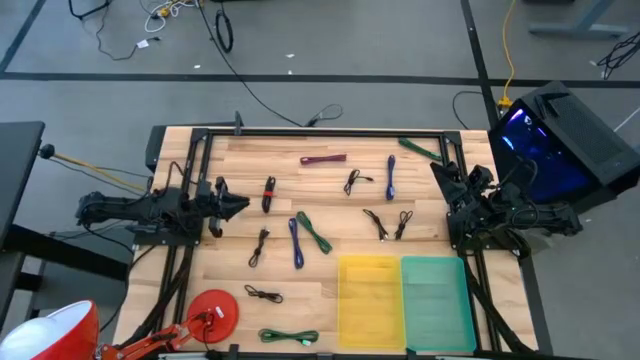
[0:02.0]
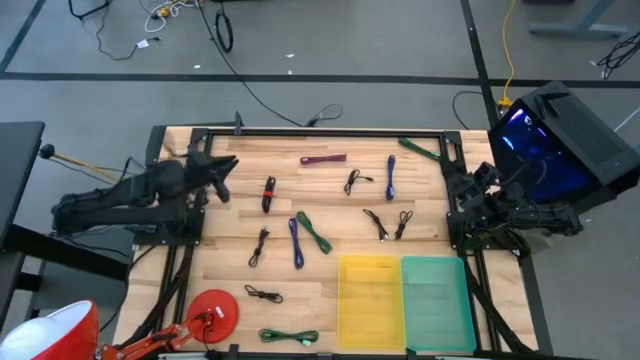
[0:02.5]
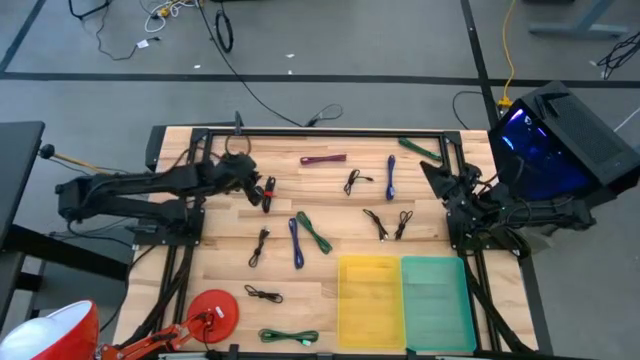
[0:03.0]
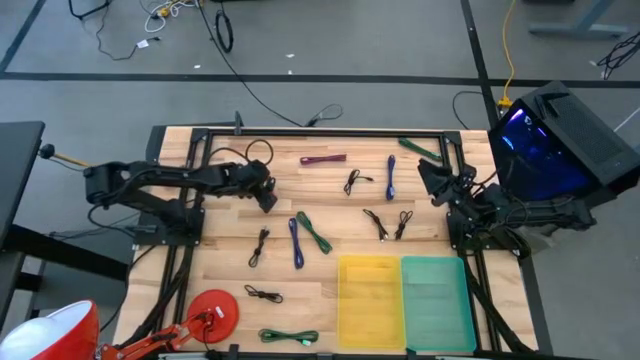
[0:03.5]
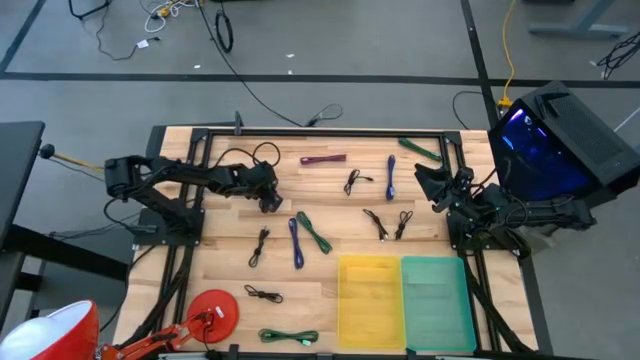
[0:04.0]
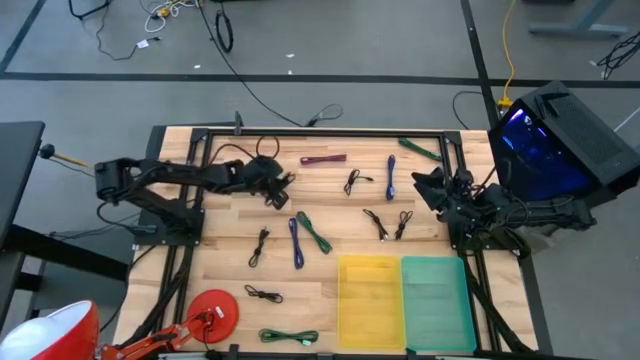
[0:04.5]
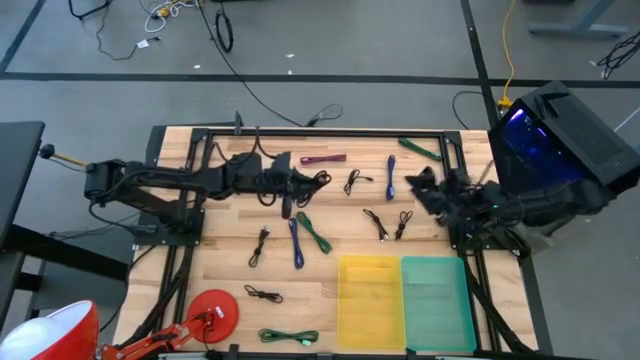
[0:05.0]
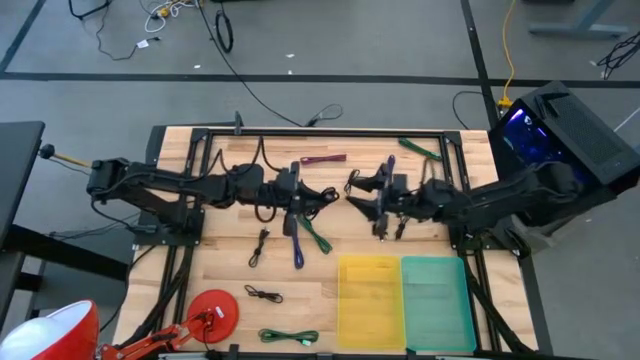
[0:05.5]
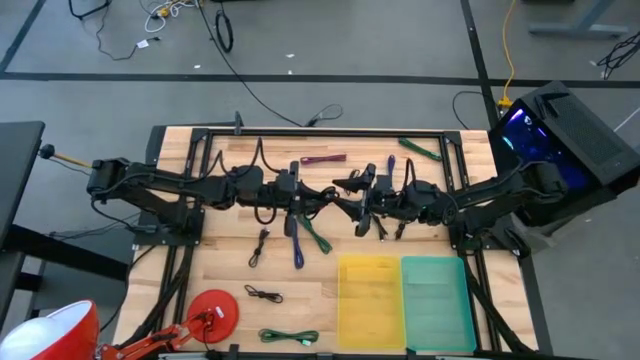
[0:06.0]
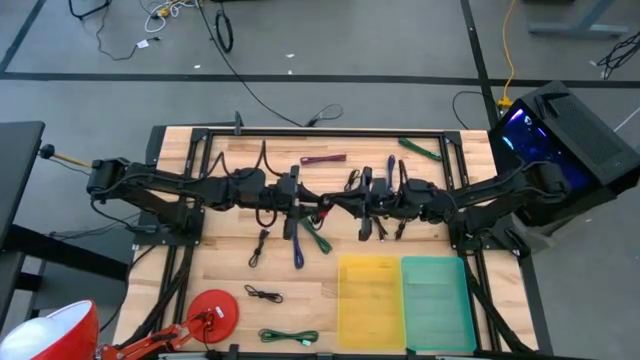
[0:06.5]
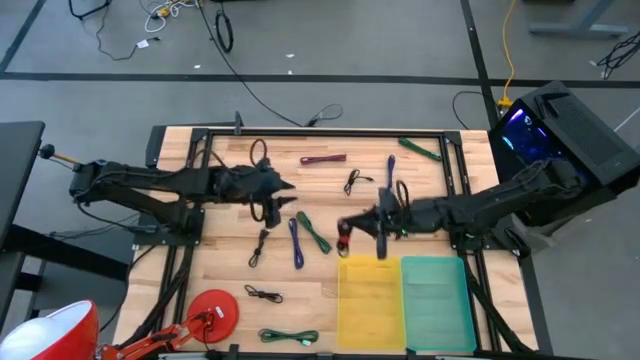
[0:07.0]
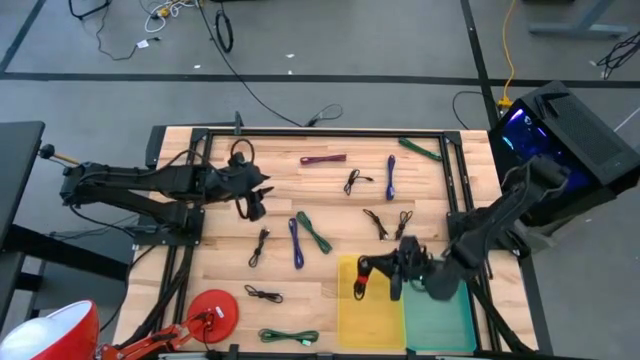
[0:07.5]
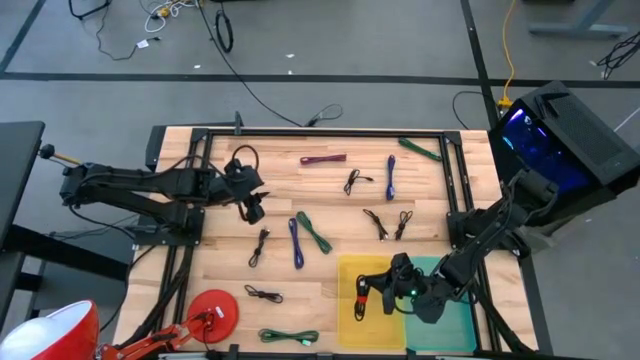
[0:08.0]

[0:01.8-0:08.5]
Task: Pick & Place USB Port
Put the black charger cable into the yellow bin

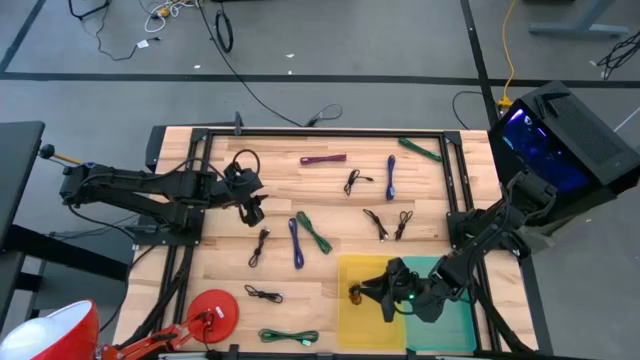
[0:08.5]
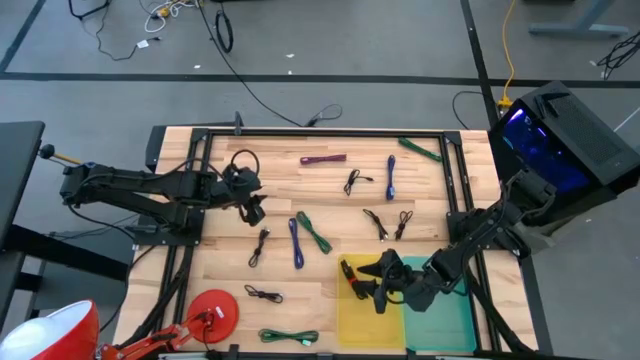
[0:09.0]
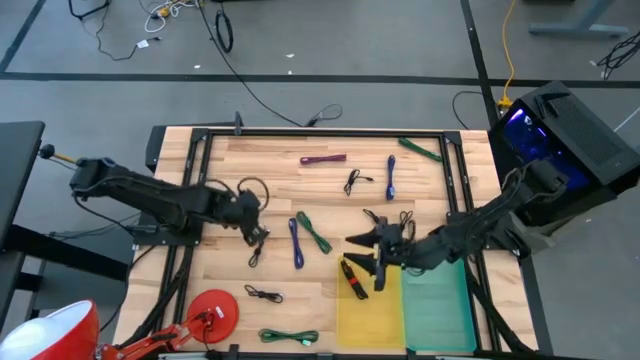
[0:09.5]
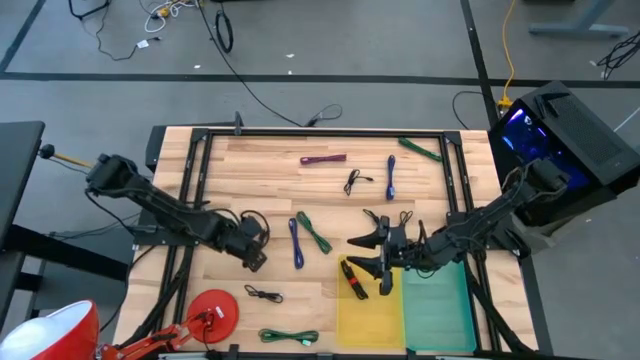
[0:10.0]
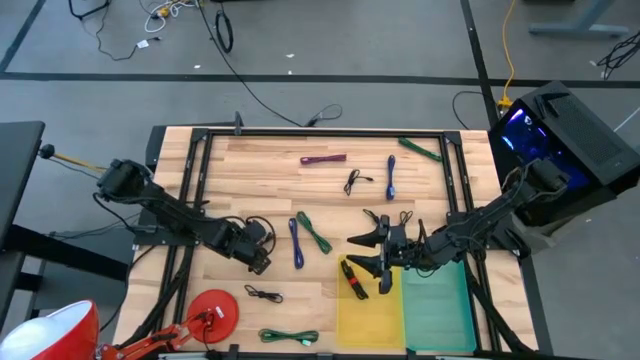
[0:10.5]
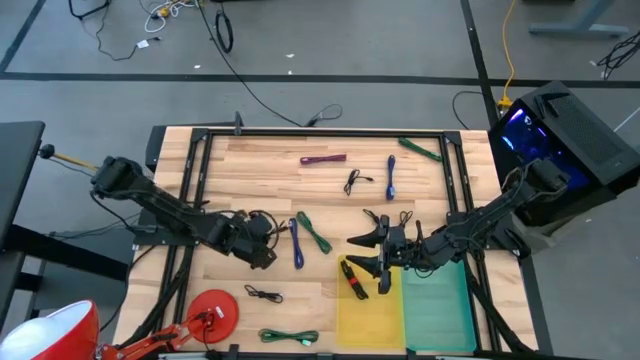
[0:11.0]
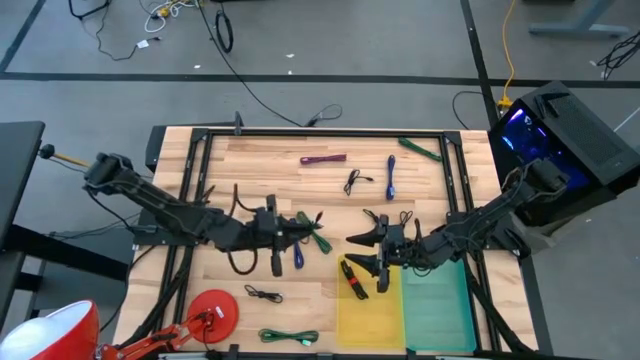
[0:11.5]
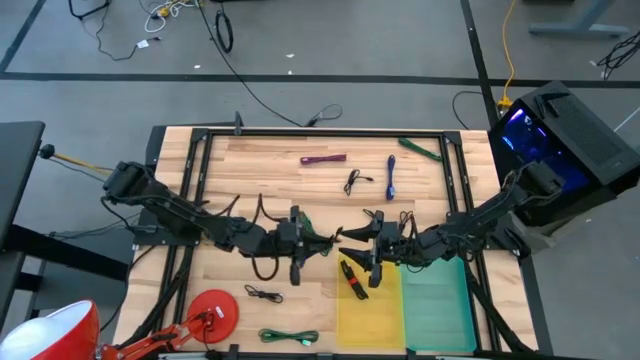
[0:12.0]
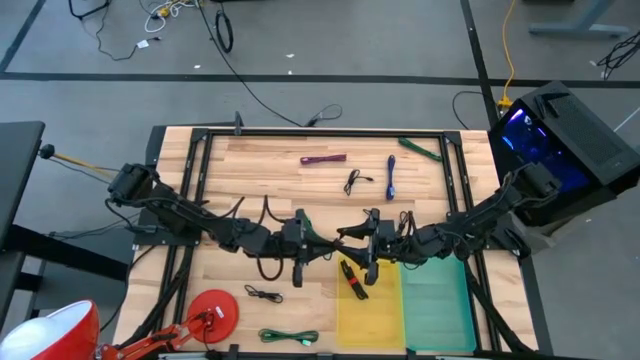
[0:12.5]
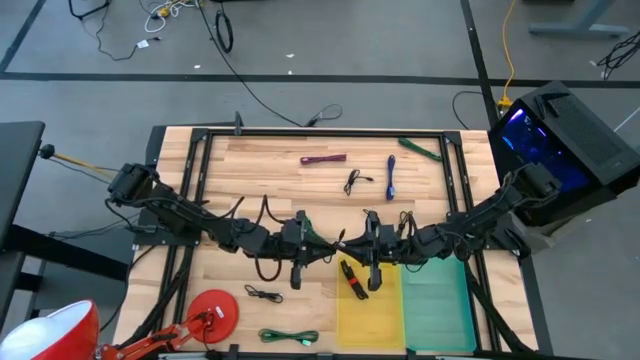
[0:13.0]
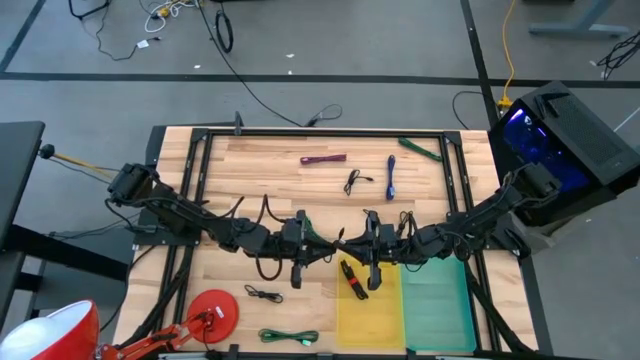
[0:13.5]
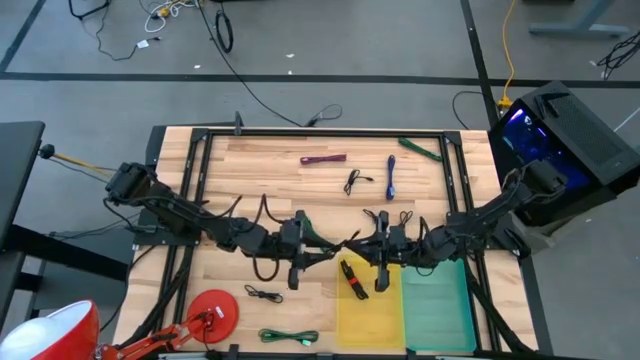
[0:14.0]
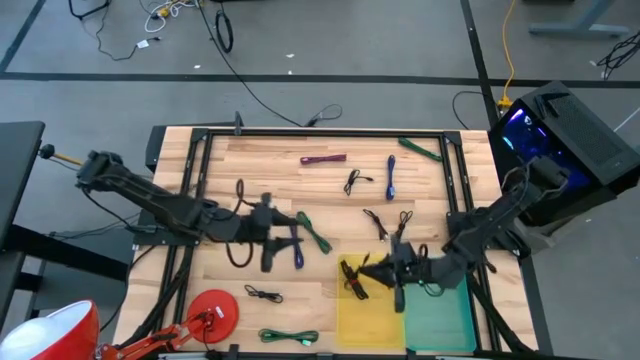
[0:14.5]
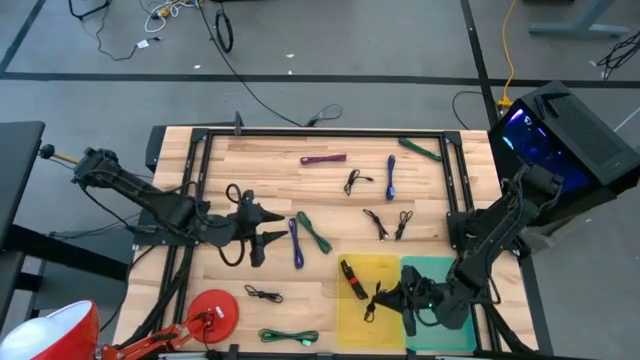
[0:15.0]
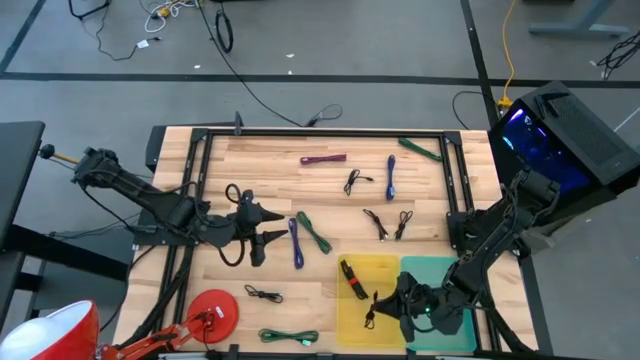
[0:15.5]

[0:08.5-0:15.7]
Put the black charger cable into the yellow bin

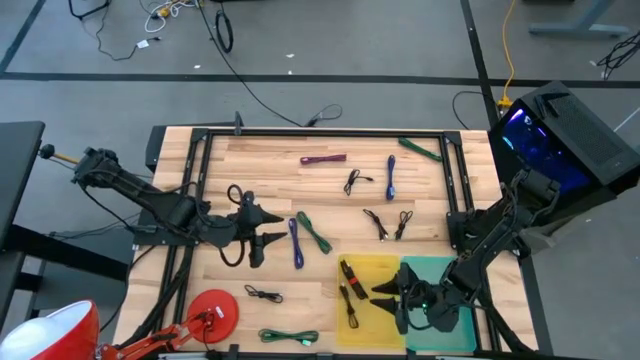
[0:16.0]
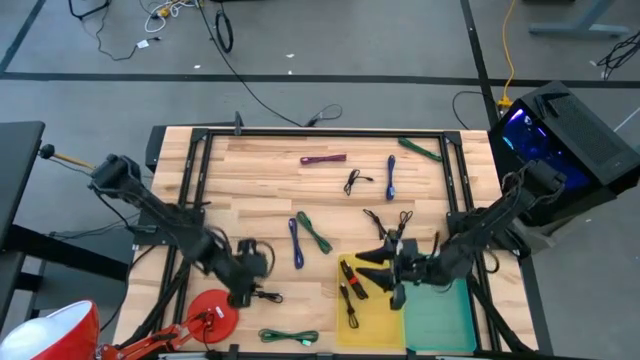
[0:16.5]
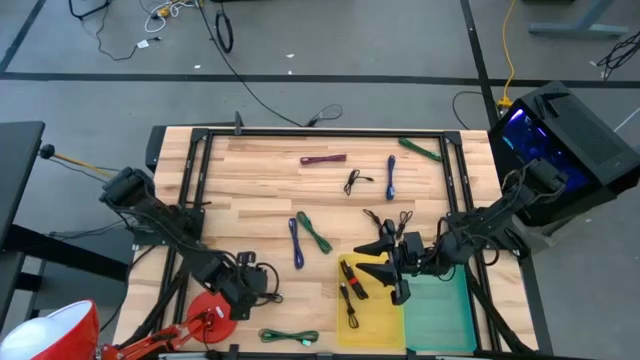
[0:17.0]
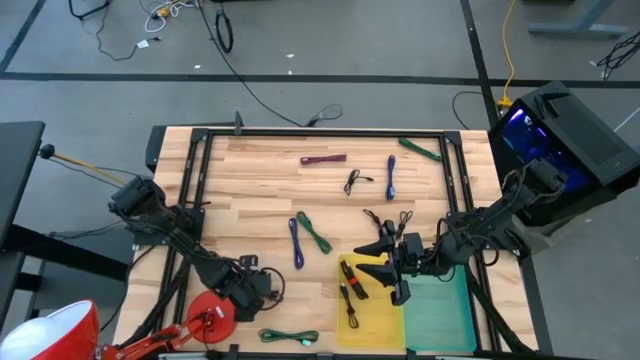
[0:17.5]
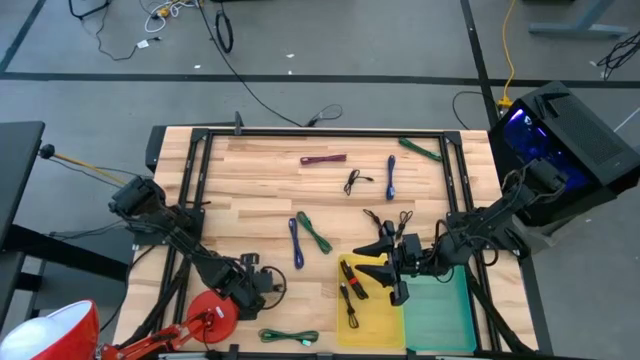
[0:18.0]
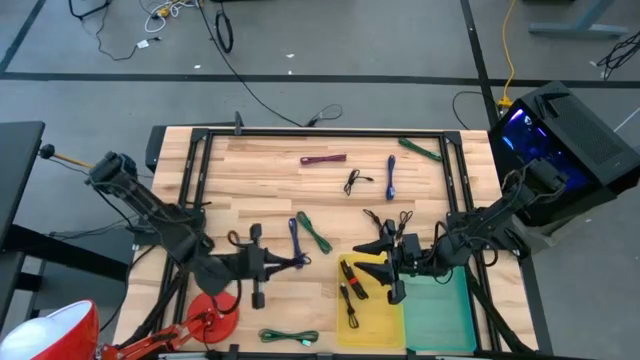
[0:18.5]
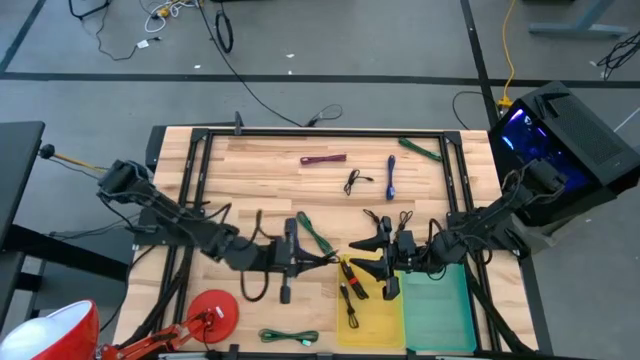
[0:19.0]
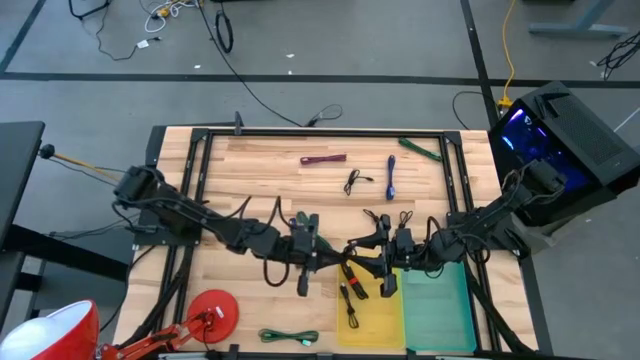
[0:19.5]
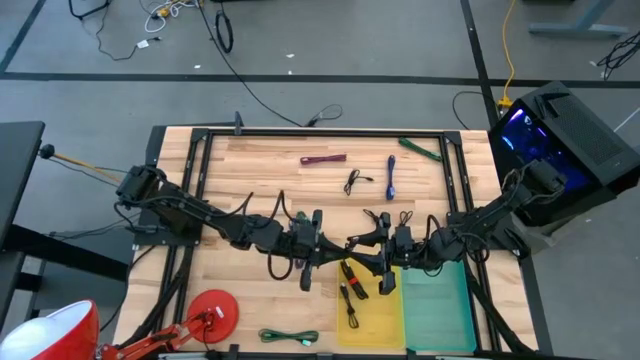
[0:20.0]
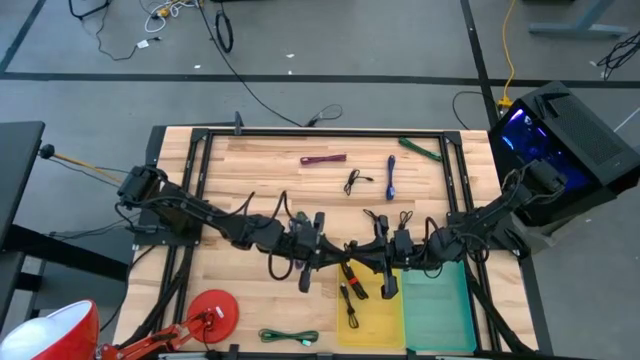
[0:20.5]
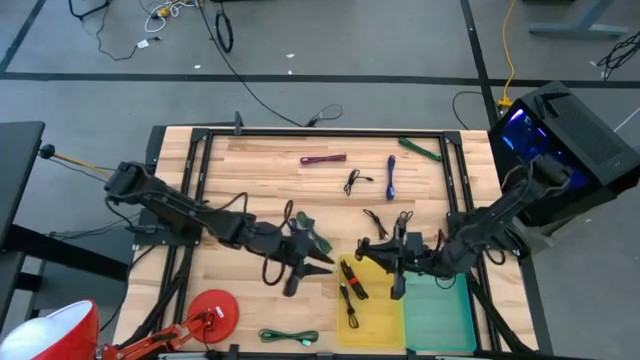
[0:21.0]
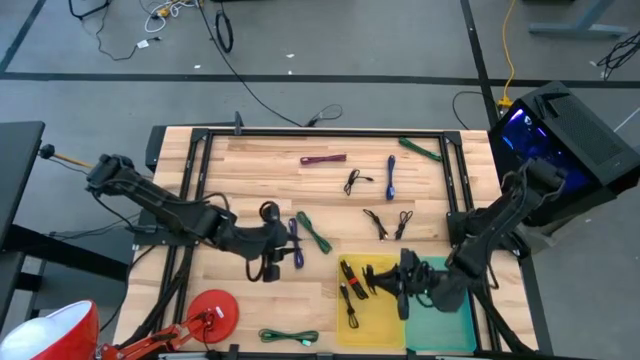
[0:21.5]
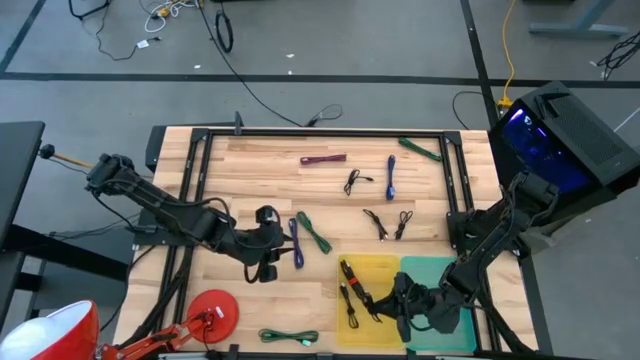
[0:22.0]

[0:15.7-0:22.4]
Put the black charger cable into the yellow bin
